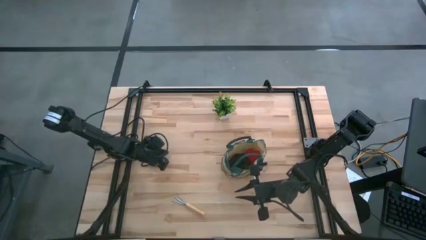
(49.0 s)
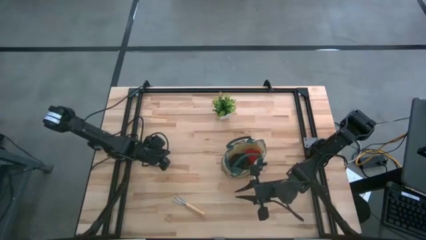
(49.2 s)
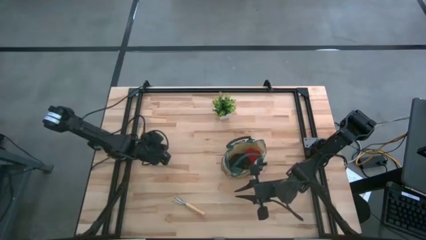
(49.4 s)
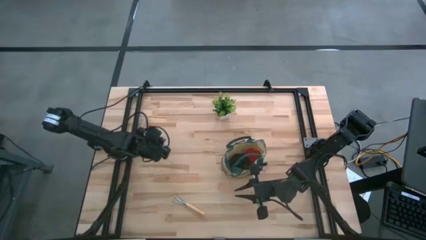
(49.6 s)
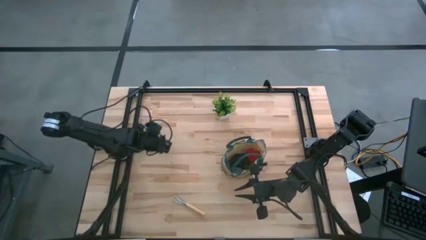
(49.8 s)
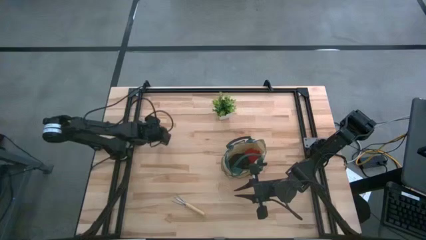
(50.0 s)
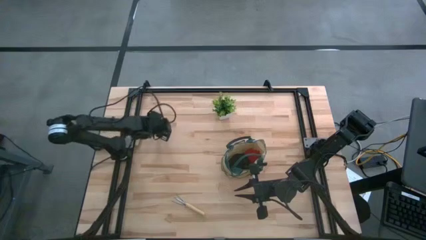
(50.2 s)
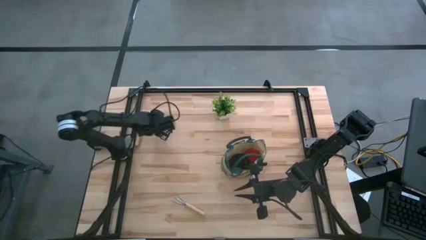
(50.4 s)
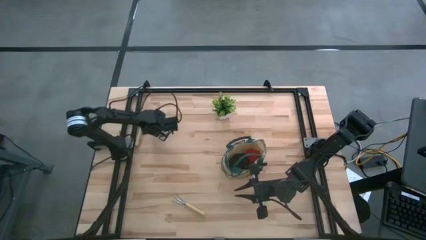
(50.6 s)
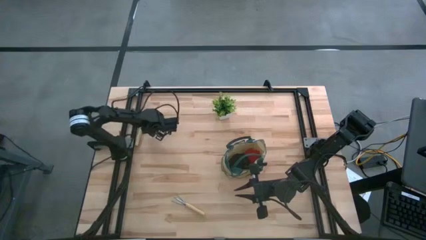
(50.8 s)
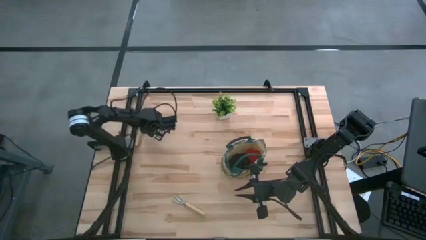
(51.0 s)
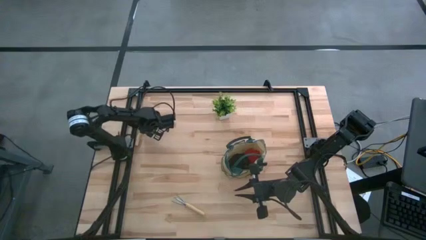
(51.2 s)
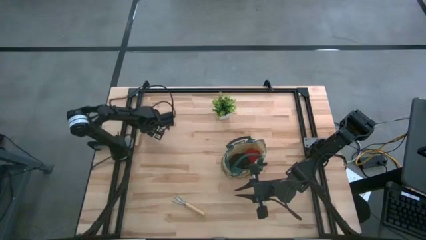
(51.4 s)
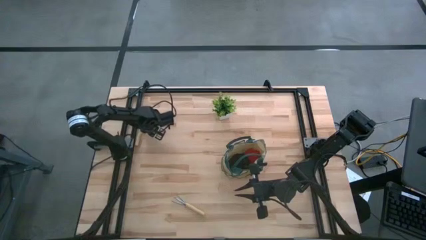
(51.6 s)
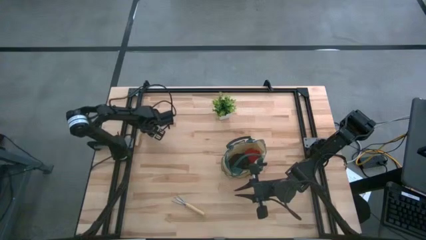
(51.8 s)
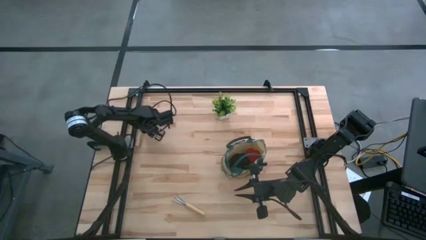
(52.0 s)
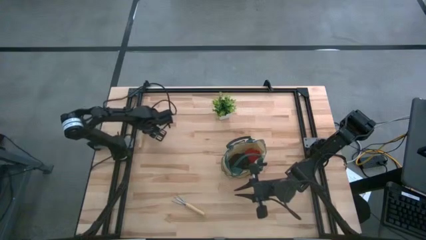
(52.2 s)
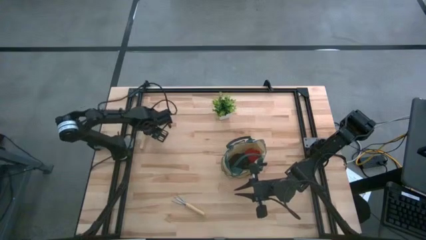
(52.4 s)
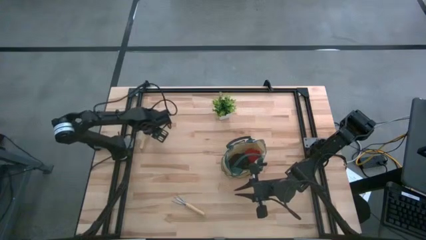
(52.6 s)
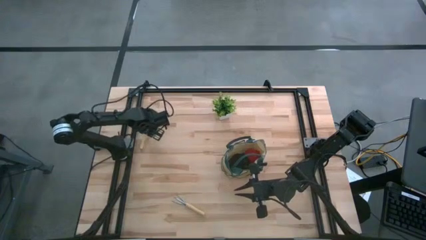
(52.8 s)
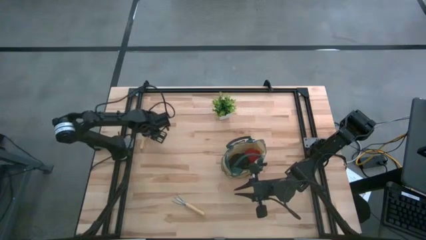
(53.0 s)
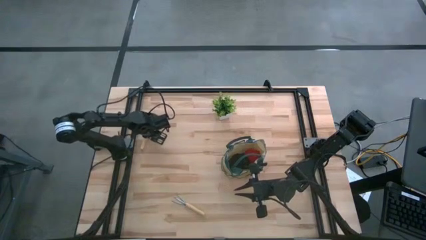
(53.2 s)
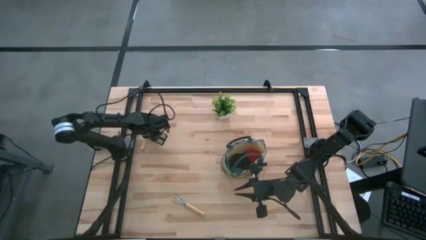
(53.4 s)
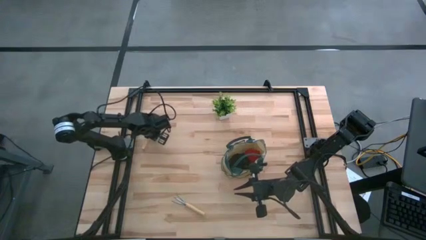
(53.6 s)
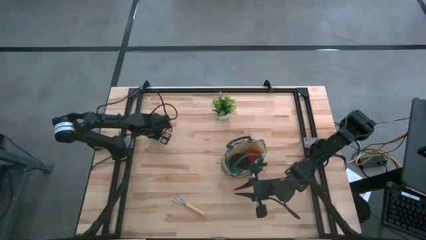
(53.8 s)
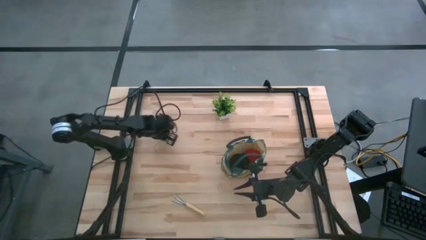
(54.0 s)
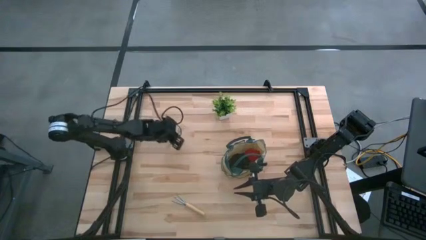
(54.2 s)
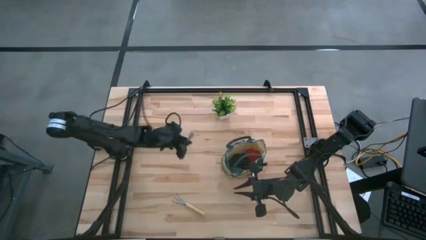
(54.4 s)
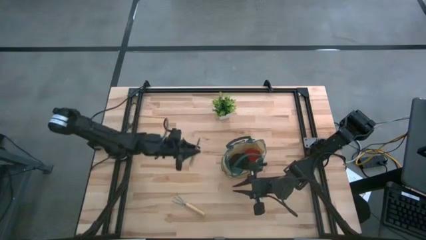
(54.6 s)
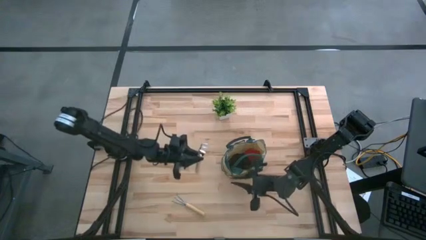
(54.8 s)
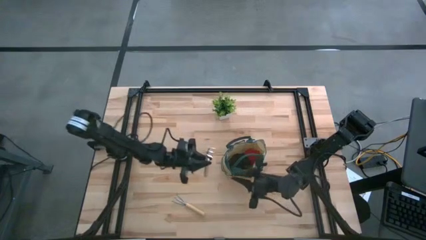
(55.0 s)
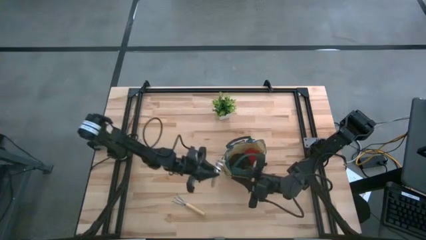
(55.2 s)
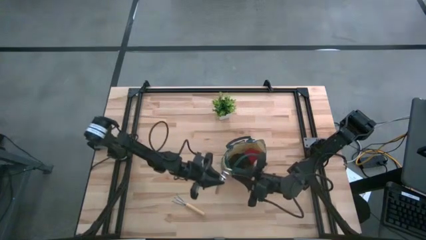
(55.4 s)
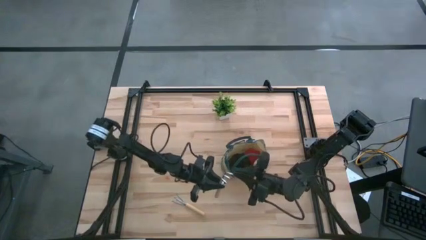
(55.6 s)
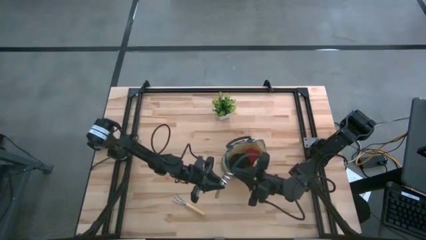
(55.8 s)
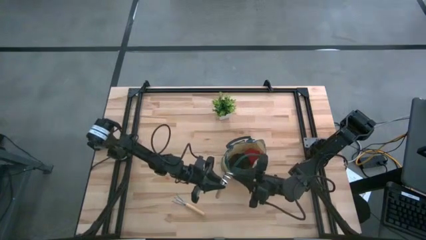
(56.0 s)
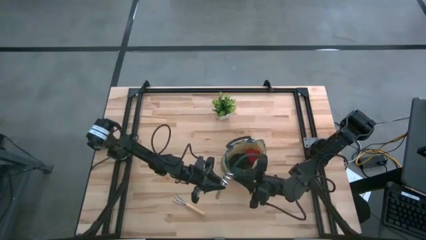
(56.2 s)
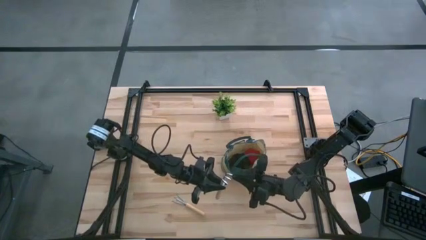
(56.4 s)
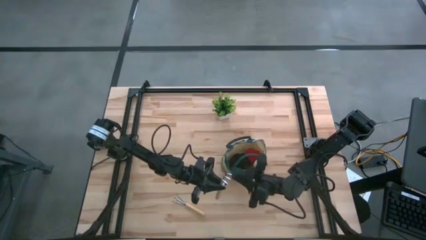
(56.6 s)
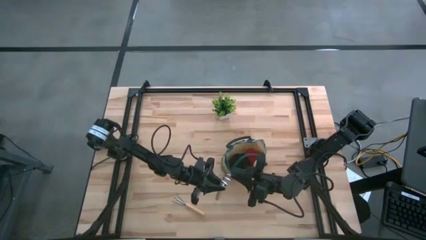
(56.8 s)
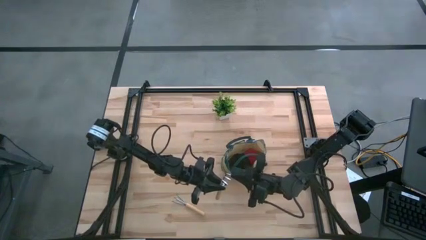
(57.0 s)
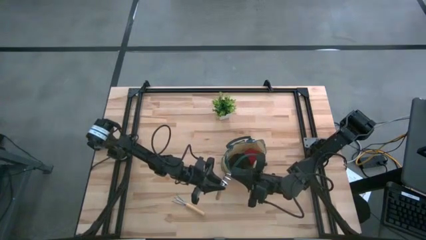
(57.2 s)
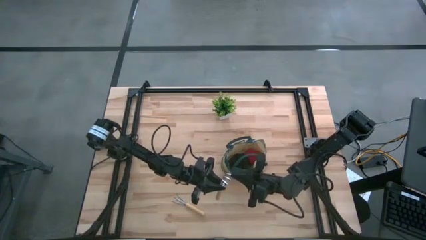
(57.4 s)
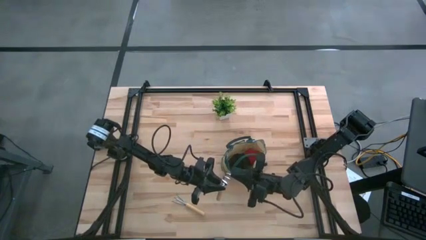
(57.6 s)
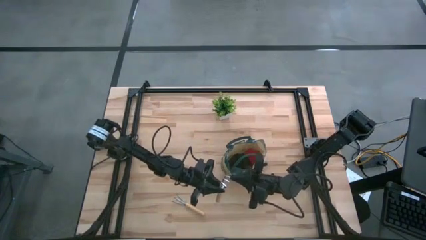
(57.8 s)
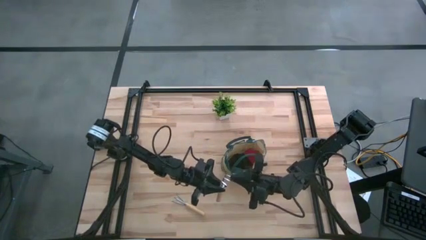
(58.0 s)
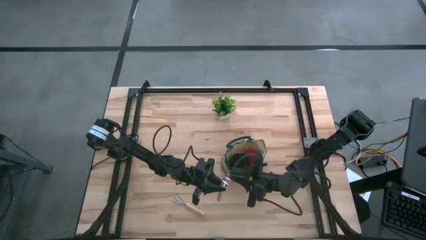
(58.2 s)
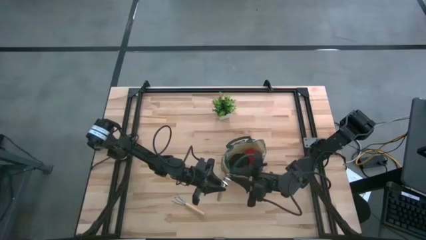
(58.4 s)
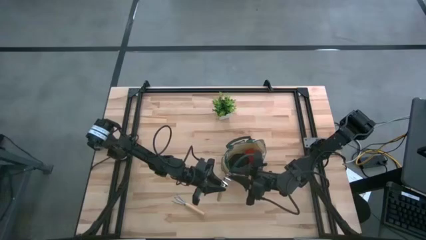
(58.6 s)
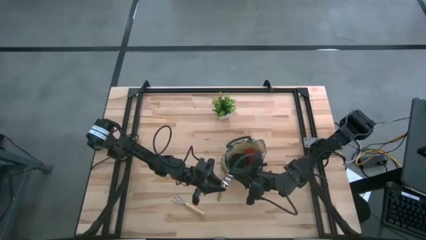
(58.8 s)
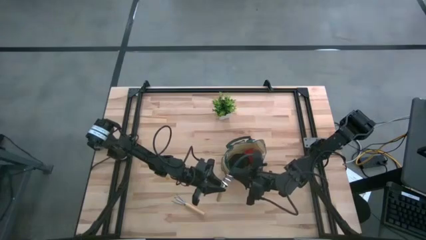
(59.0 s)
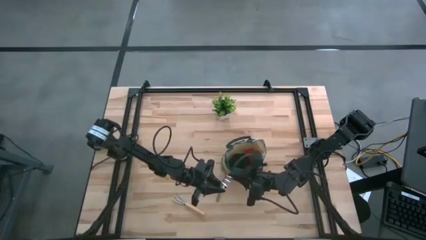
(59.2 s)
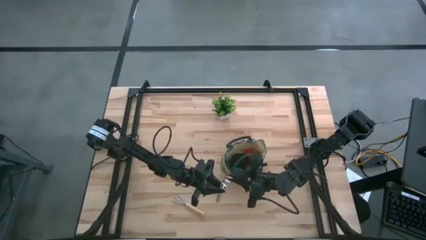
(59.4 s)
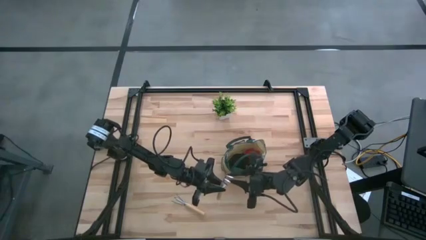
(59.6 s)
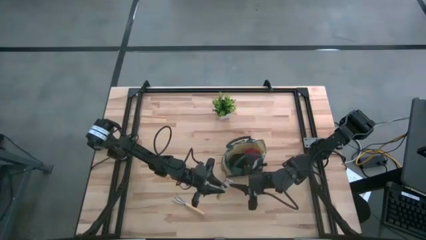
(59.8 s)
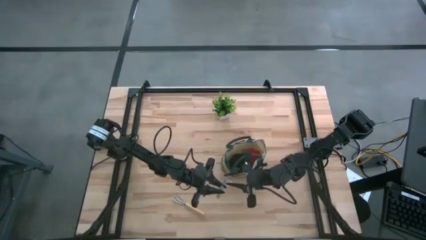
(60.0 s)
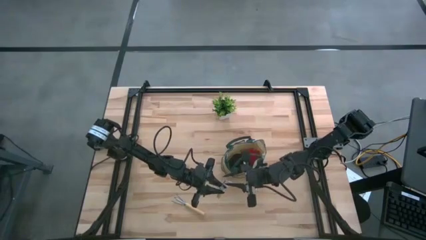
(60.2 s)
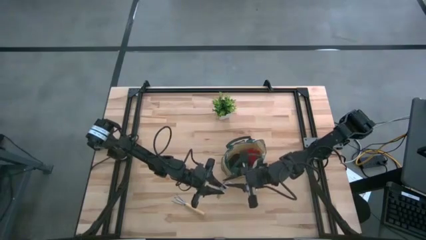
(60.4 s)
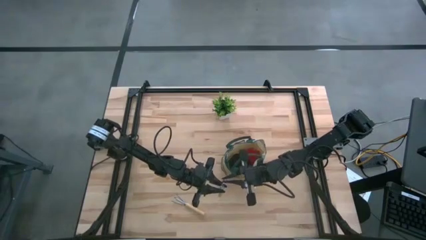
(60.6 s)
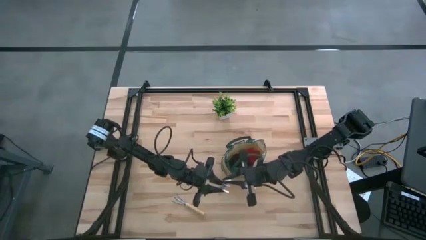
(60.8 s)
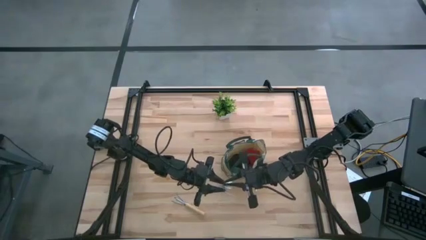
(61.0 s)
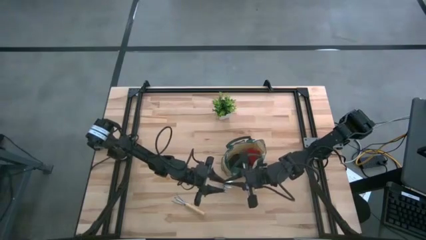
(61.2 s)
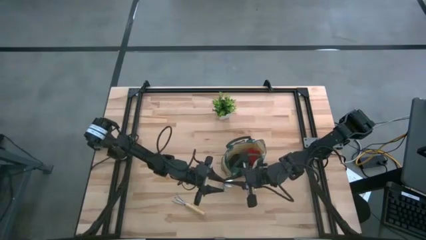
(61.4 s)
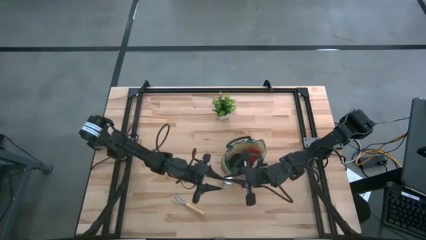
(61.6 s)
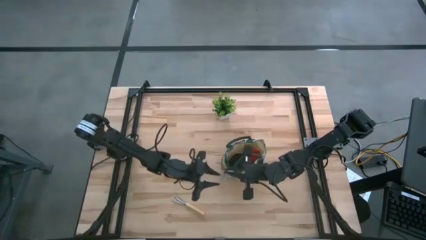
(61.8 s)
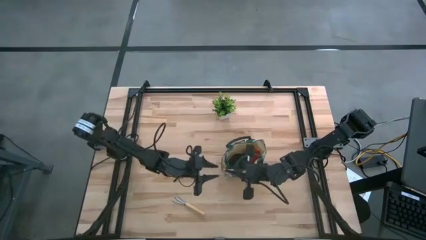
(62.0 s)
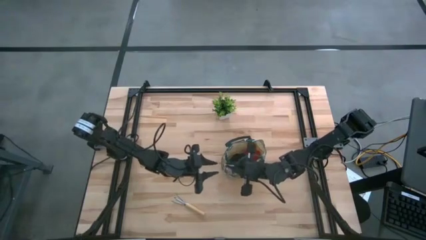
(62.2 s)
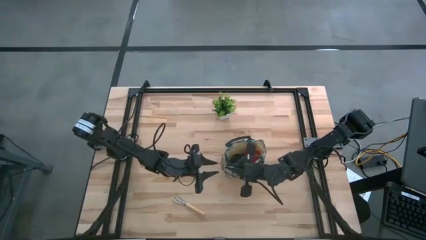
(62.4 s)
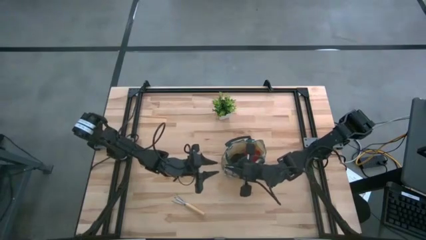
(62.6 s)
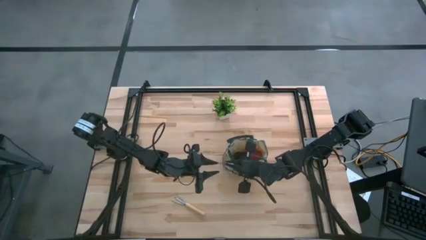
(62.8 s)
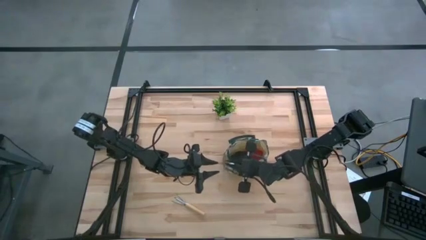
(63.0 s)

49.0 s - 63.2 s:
Task: Pick & Place Garden tools in Gardening bag
Put the top hand rake into the side pocket of the gardening bag
